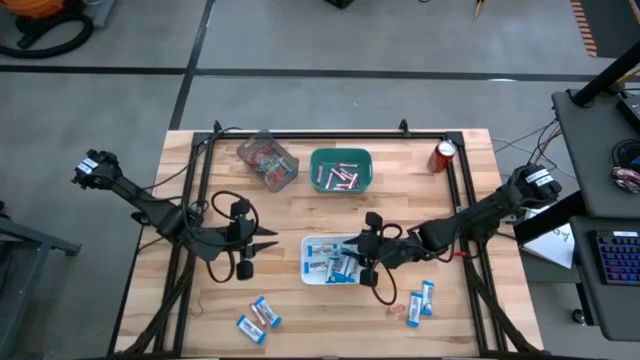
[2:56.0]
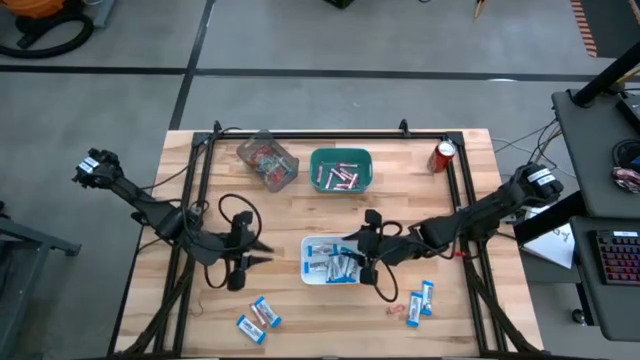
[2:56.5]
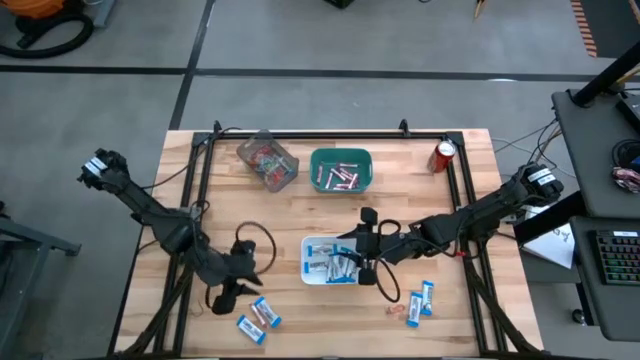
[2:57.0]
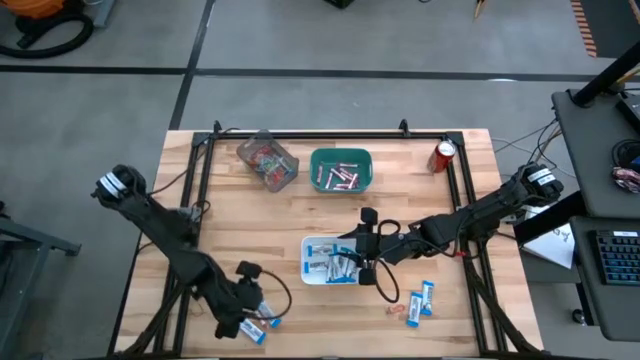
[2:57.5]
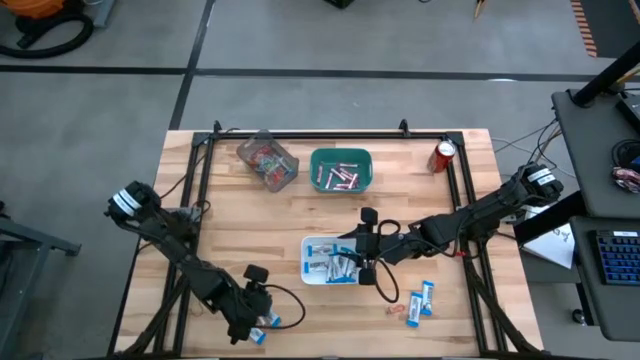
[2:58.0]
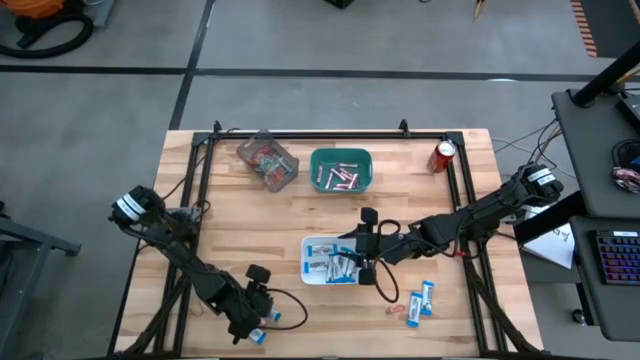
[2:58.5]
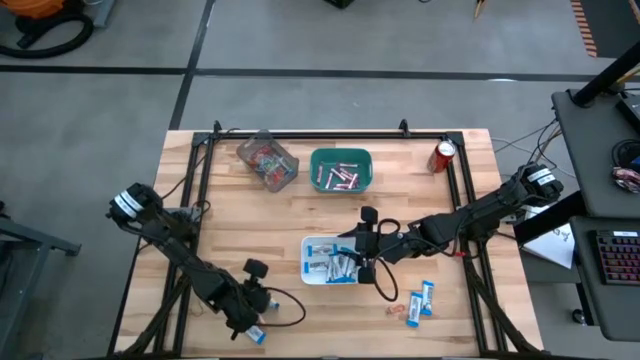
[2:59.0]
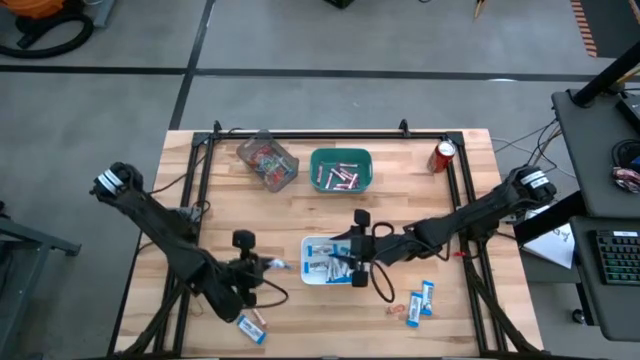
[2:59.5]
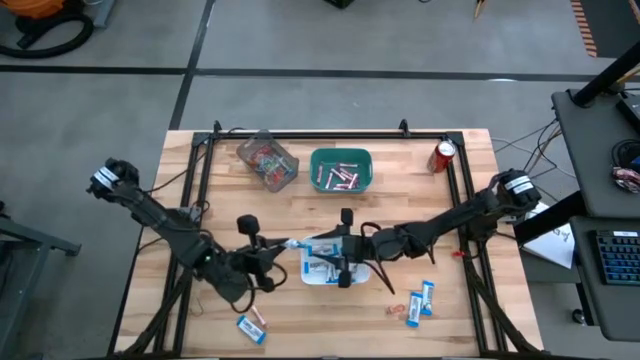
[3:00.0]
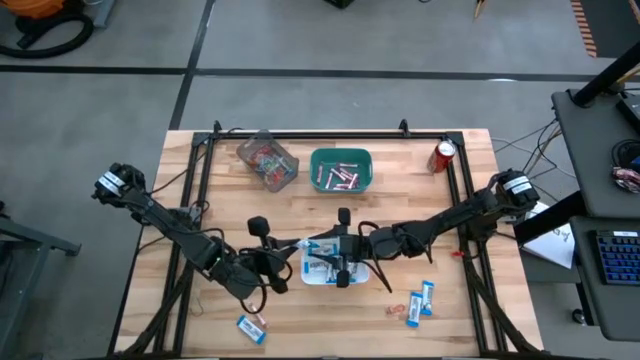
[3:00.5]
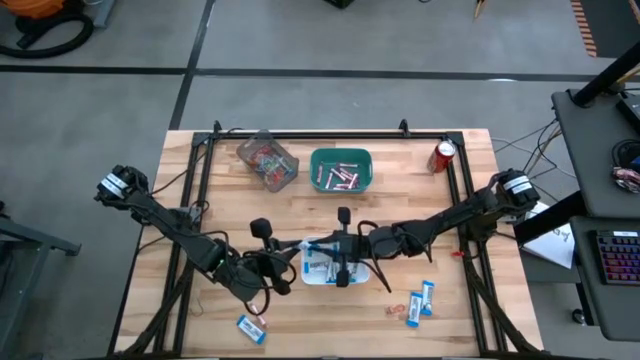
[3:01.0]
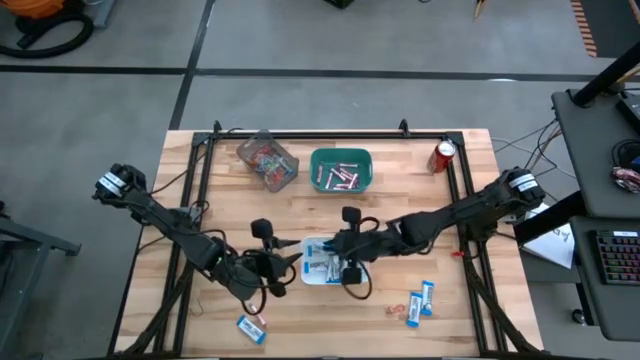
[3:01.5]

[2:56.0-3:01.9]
Task: Sort candy
Put the white chocolate bar into the white bin

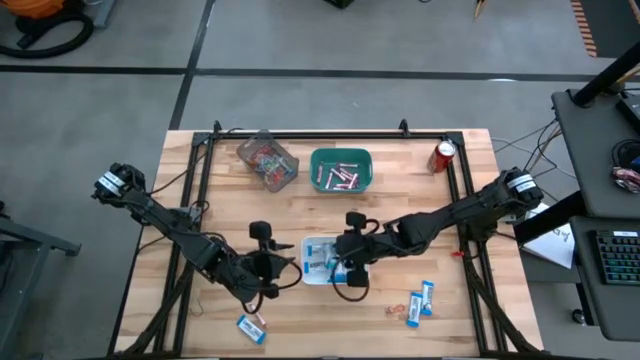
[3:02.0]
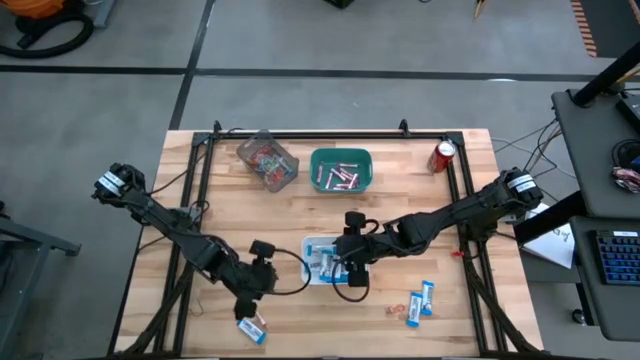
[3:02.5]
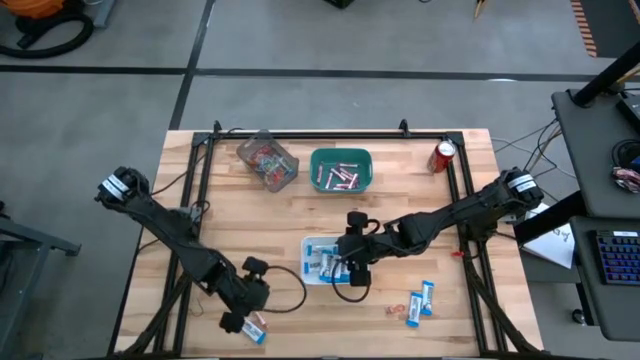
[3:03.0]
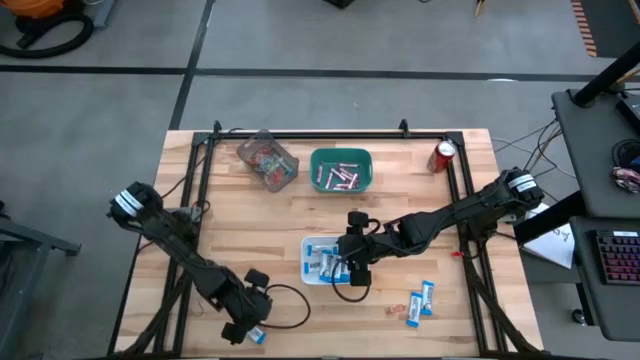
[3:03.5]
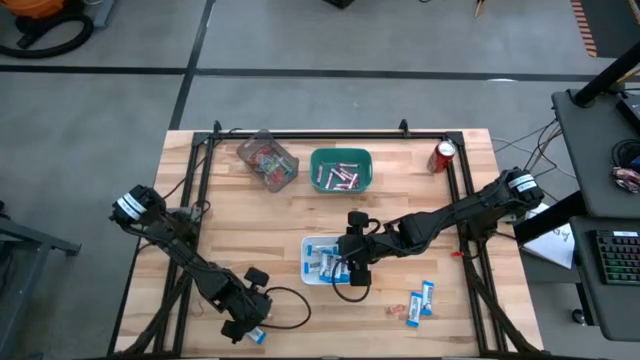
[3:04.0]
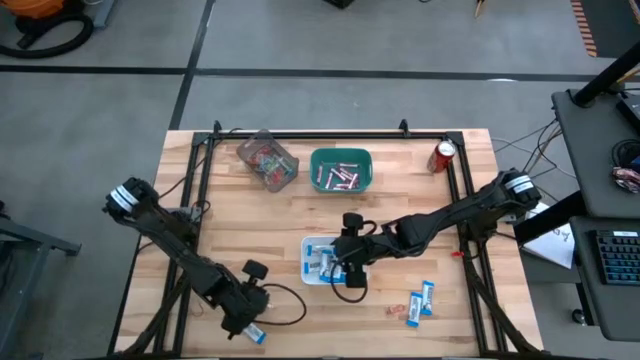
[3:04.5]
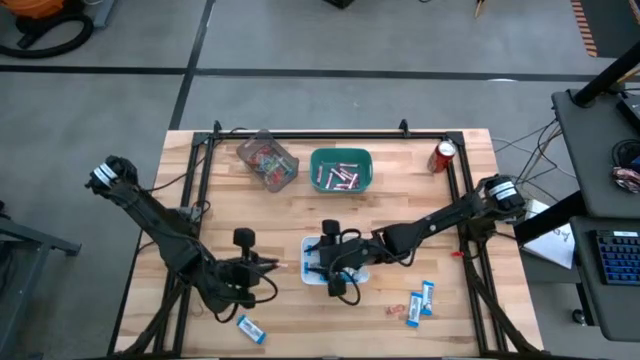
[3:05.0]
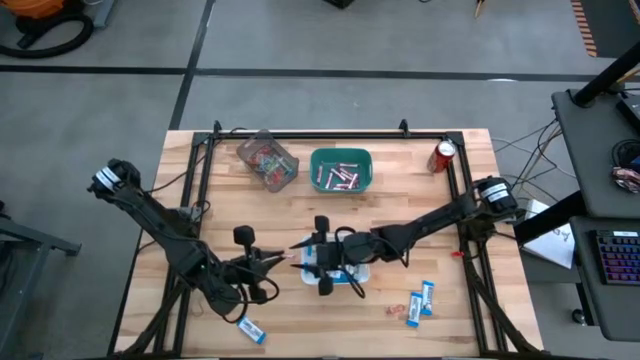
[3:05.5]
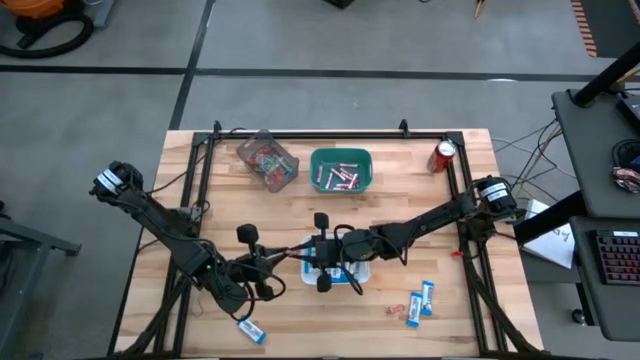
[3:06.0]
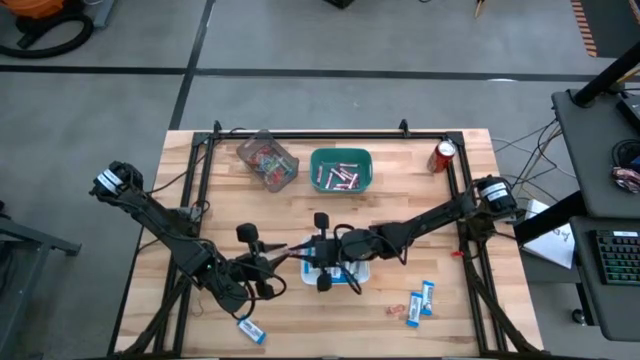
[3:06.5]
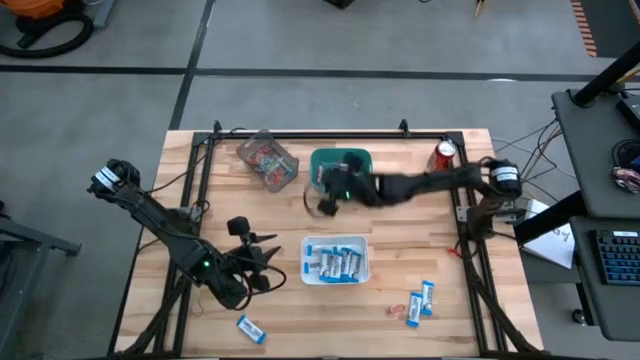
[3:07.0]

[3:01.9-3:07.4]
Put the white candy into the green bin

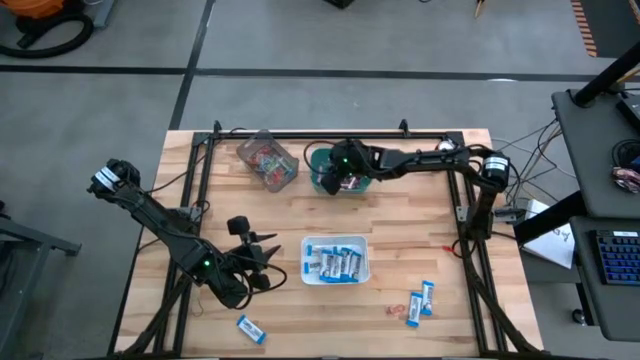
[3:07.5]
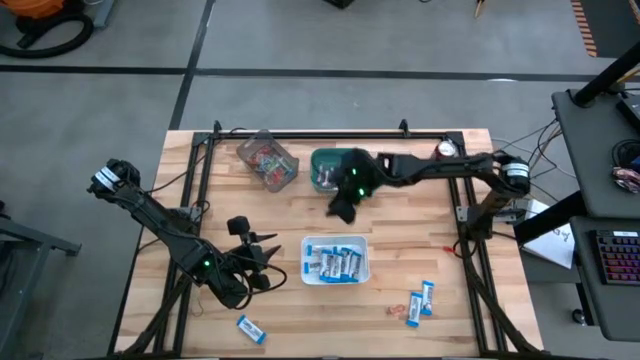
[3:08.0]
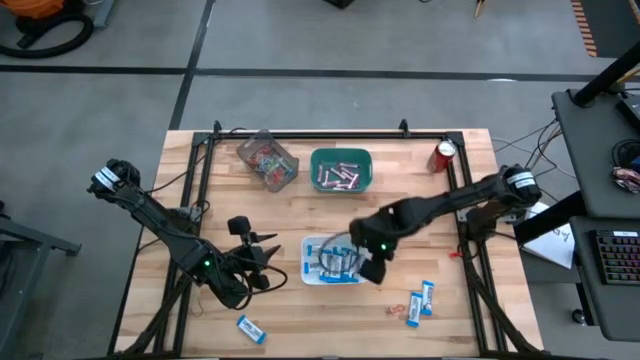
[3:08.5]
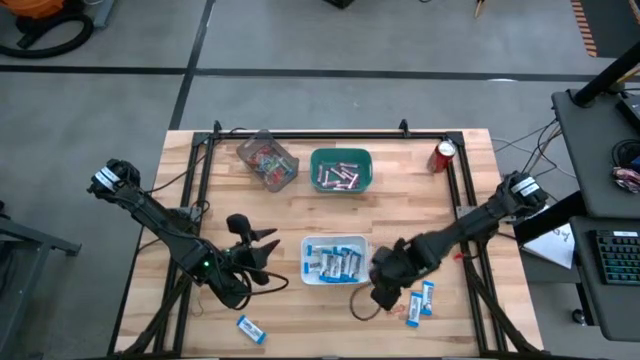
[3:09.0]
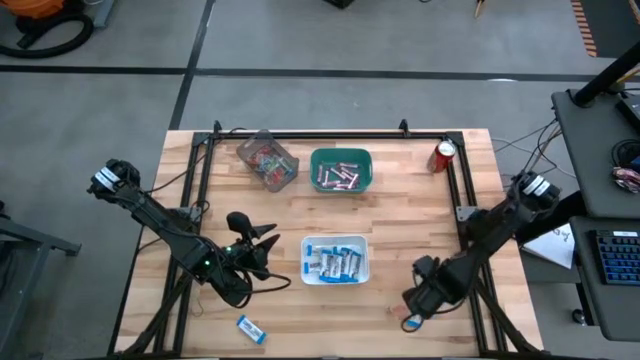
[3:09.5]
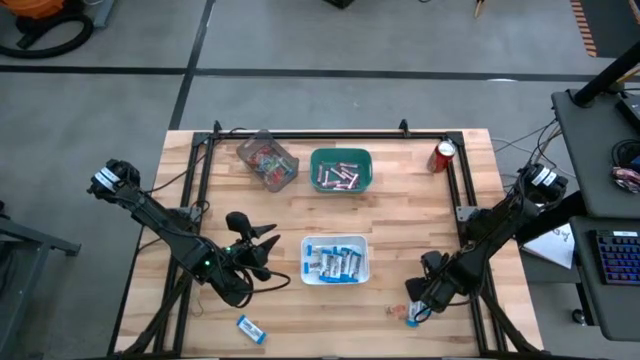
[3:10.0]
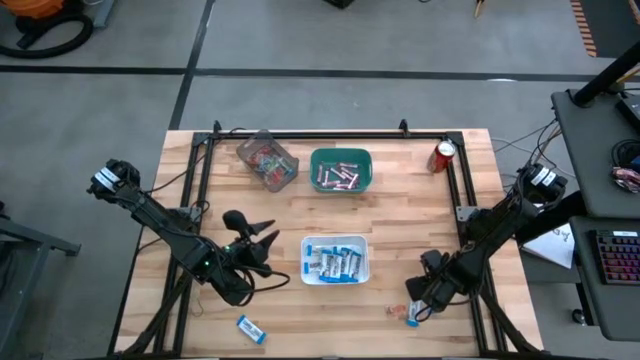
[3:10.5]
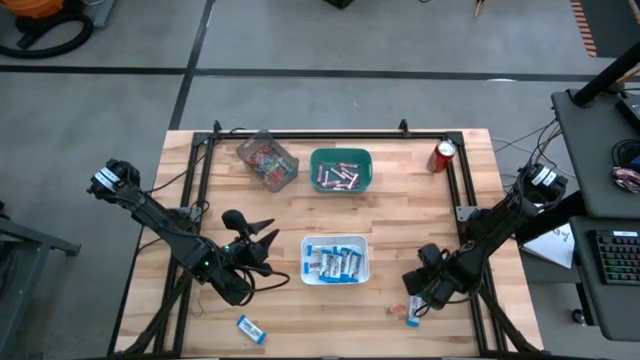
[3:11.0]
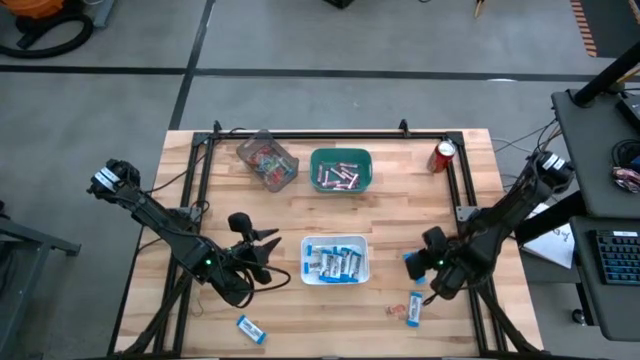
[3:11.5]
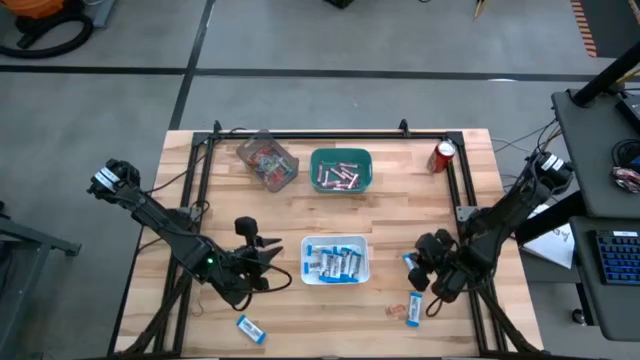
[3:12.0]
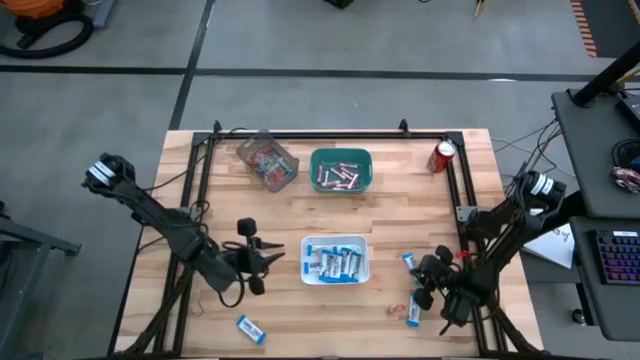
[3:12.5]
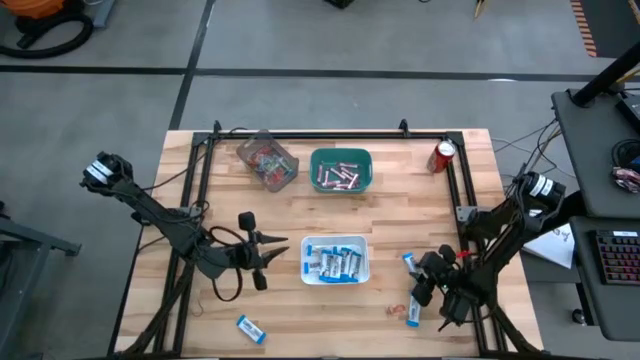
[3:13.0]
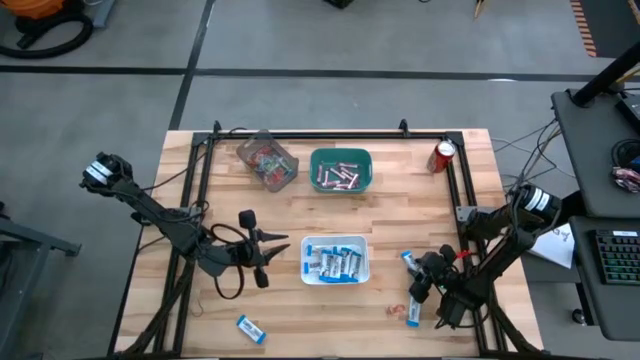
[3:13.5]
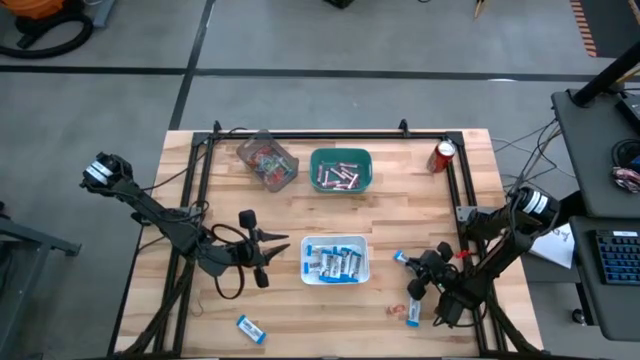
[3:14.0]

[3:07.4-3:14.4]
Put the white chocolate bar into the white bin

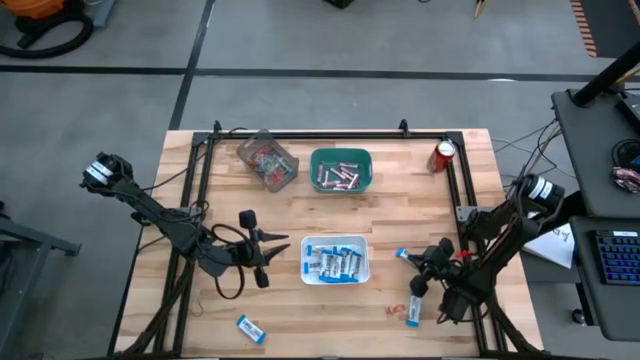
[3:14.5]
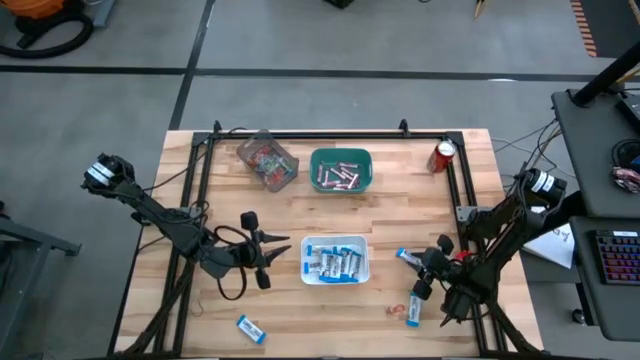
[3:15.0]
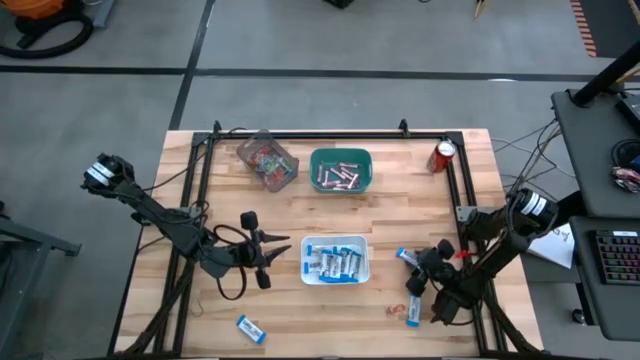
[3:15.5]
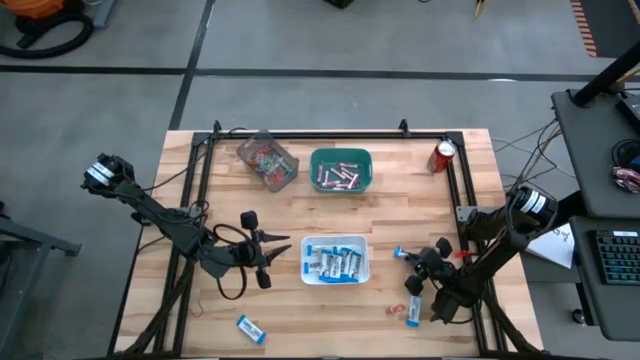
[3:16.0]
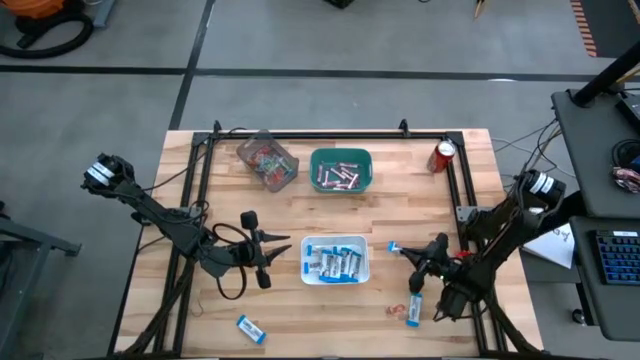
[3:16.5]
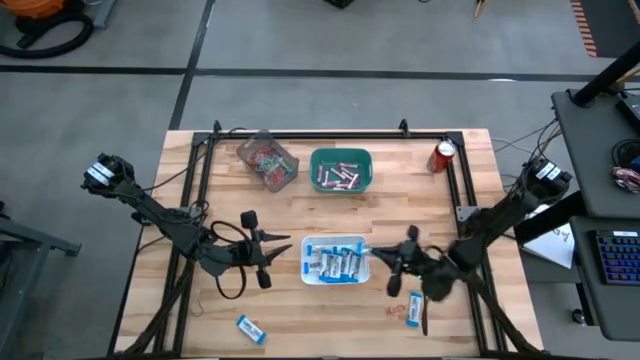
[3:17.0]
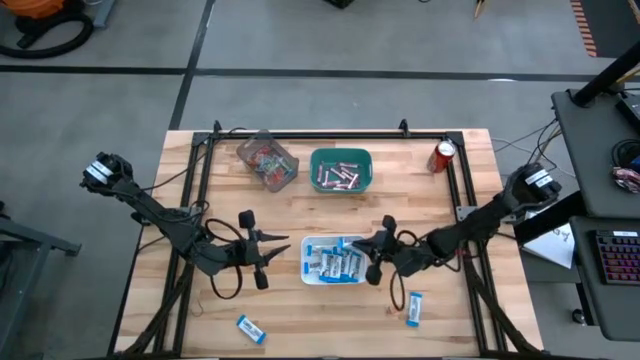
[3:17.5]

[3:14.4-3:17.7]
Put the white chocolate bar into the white bin
